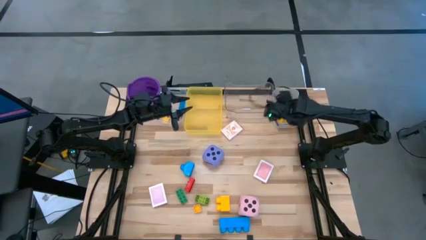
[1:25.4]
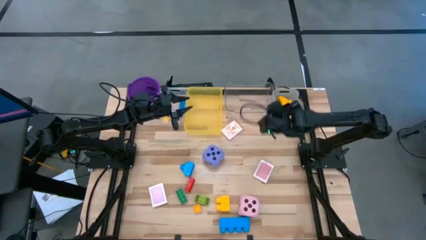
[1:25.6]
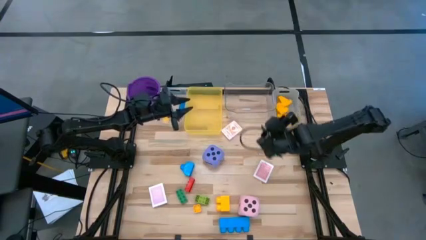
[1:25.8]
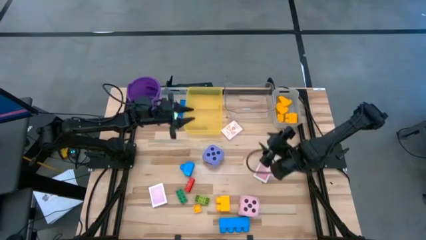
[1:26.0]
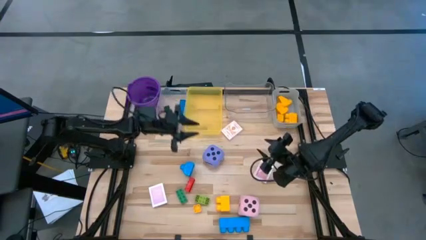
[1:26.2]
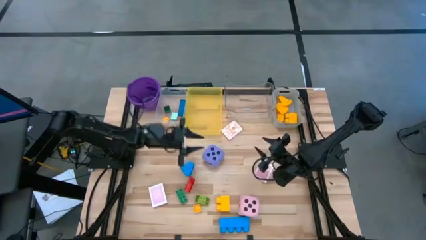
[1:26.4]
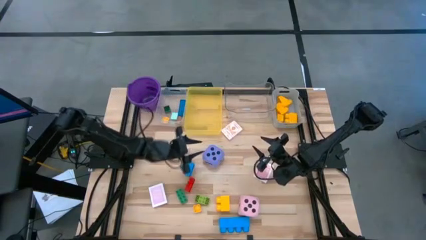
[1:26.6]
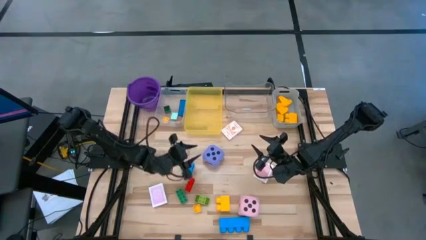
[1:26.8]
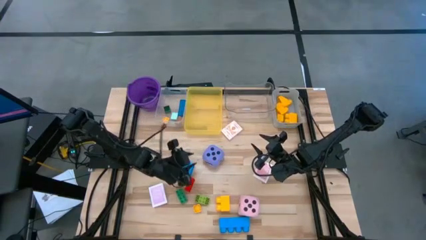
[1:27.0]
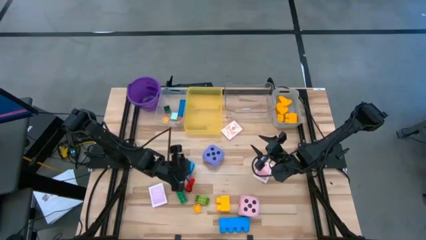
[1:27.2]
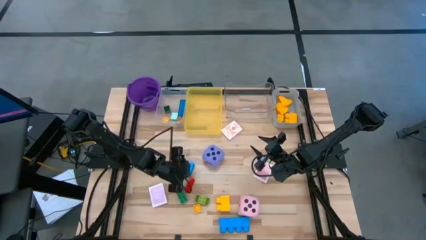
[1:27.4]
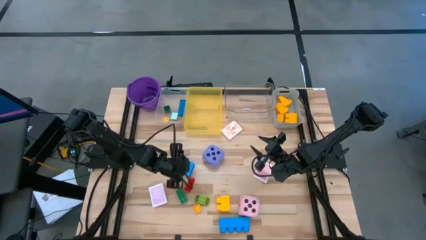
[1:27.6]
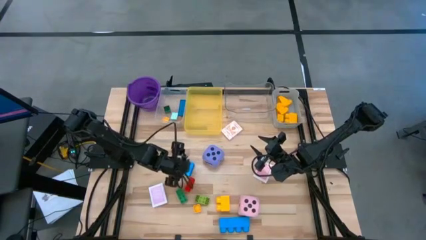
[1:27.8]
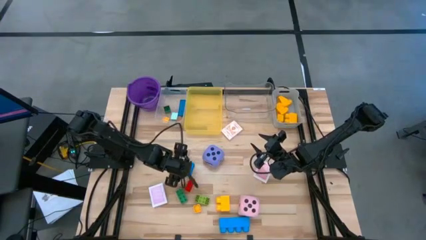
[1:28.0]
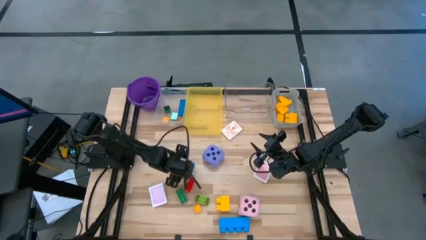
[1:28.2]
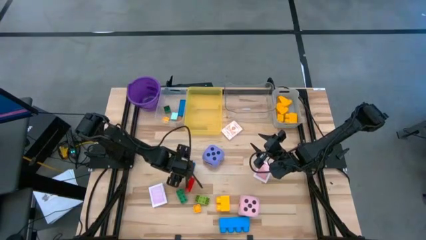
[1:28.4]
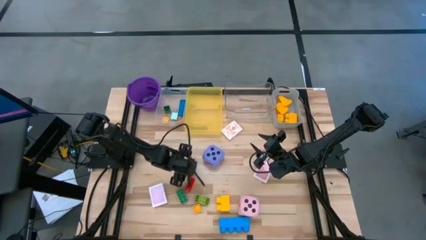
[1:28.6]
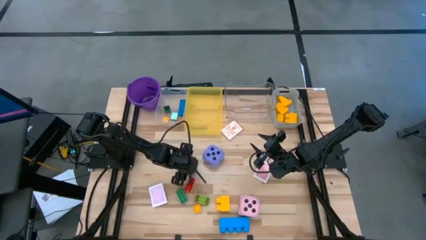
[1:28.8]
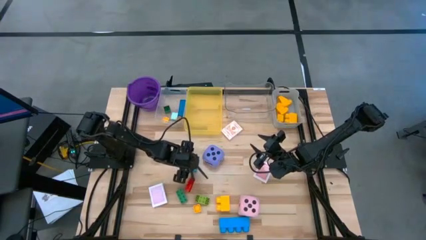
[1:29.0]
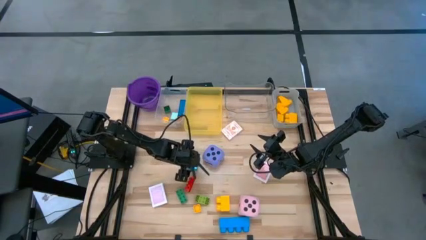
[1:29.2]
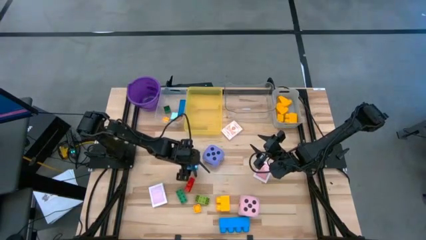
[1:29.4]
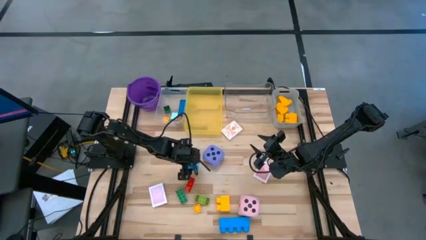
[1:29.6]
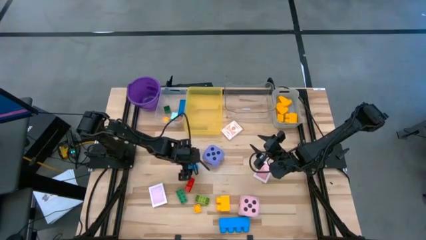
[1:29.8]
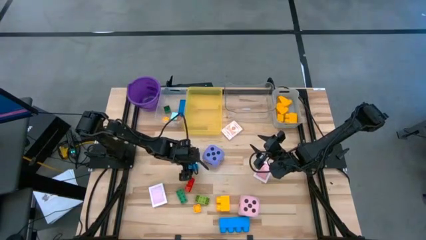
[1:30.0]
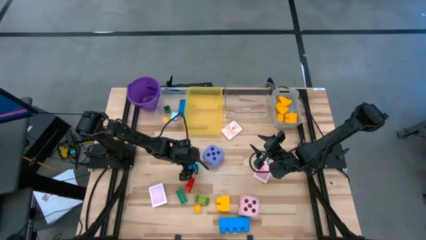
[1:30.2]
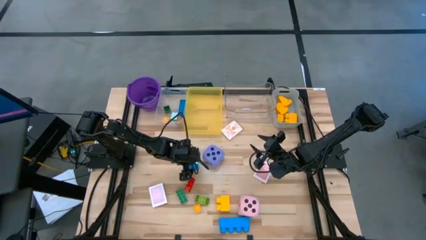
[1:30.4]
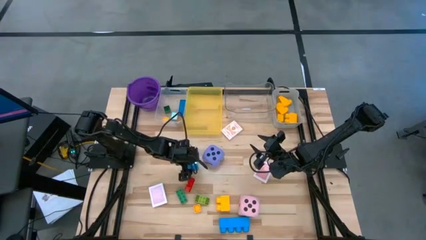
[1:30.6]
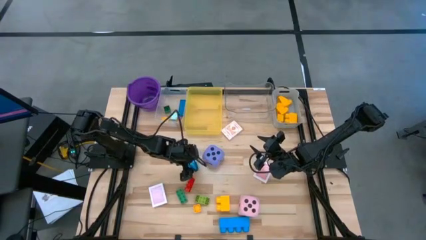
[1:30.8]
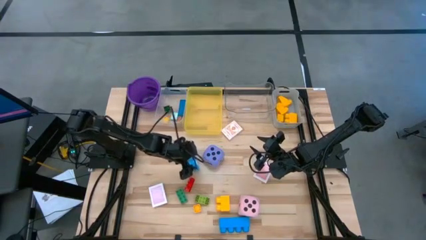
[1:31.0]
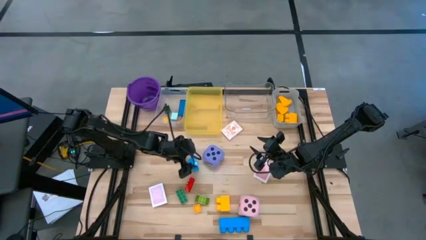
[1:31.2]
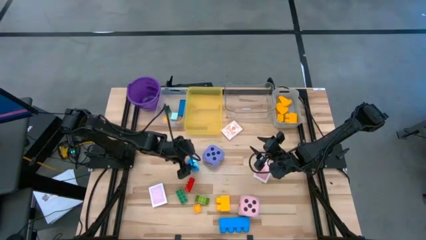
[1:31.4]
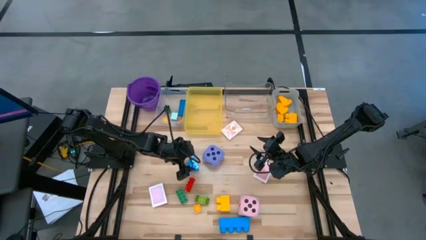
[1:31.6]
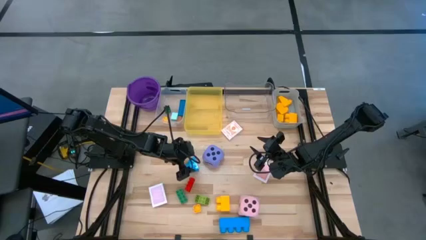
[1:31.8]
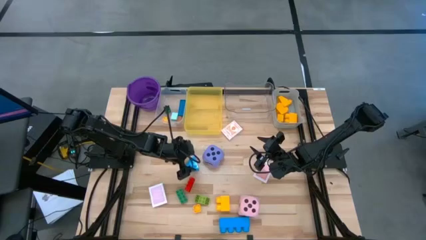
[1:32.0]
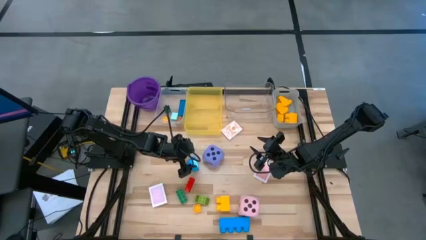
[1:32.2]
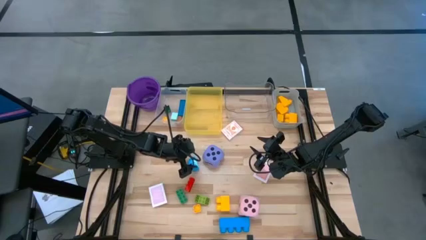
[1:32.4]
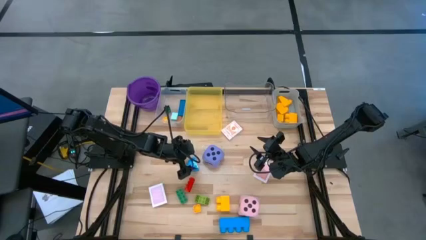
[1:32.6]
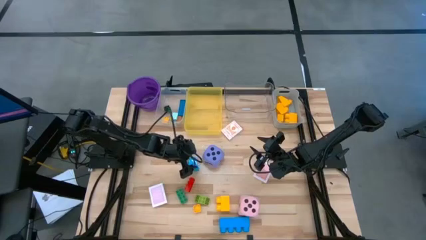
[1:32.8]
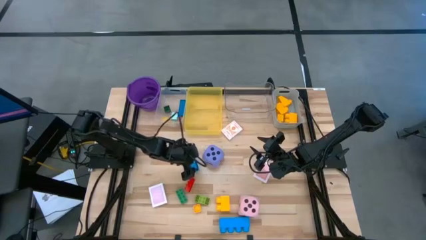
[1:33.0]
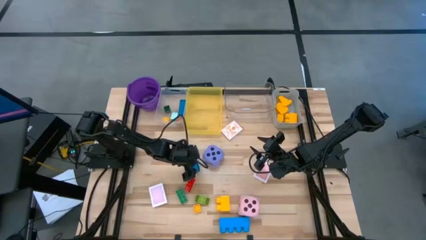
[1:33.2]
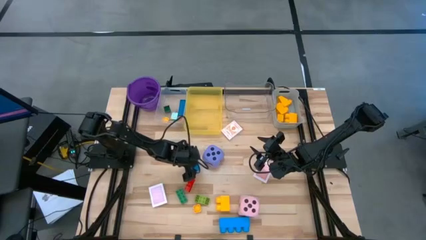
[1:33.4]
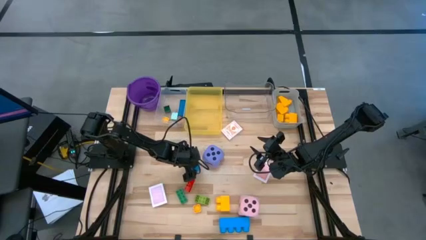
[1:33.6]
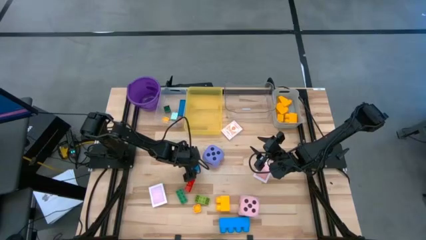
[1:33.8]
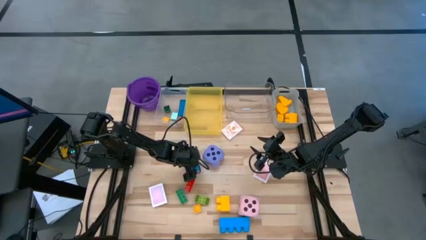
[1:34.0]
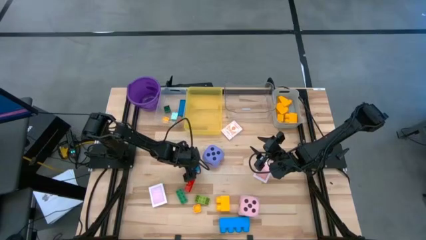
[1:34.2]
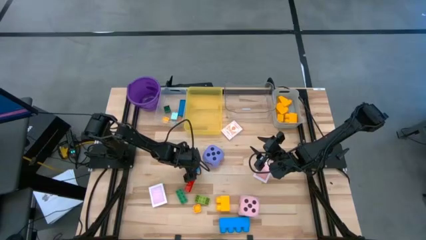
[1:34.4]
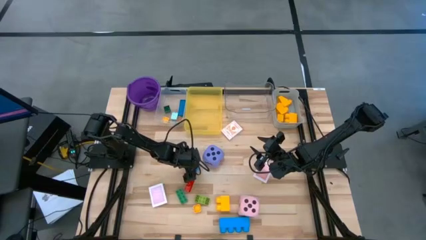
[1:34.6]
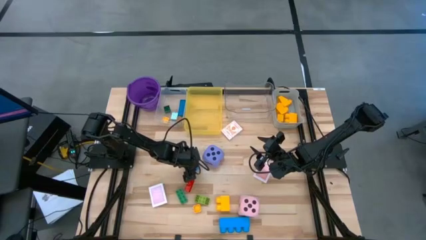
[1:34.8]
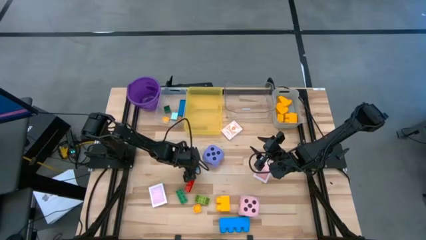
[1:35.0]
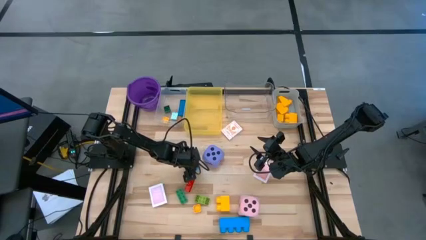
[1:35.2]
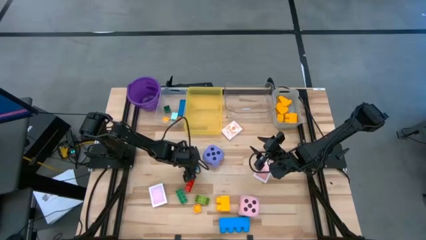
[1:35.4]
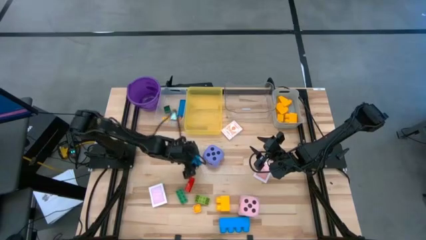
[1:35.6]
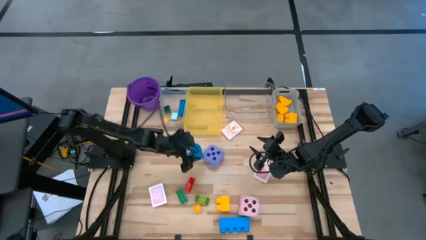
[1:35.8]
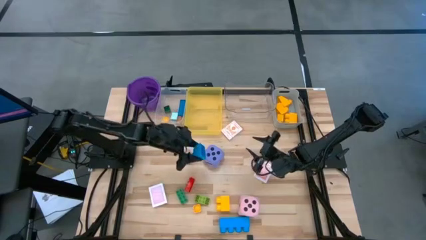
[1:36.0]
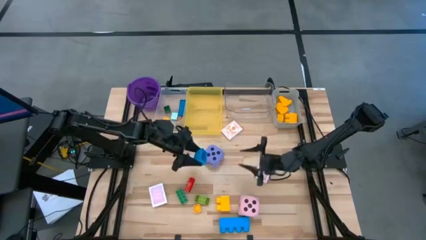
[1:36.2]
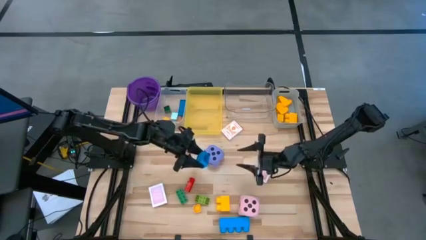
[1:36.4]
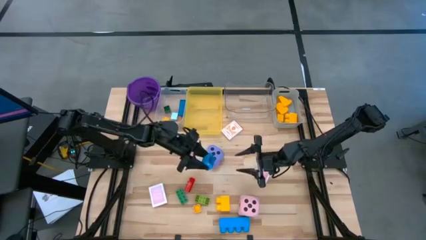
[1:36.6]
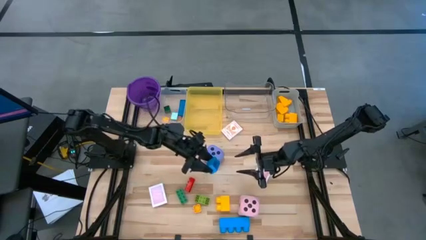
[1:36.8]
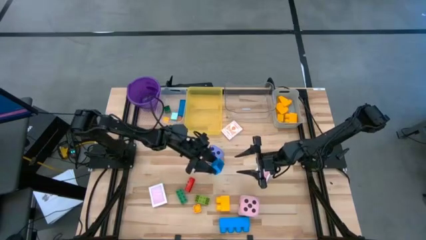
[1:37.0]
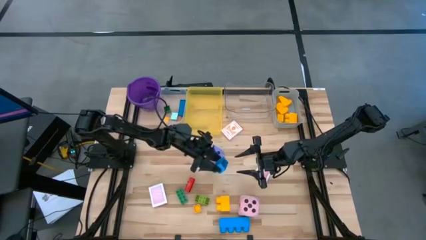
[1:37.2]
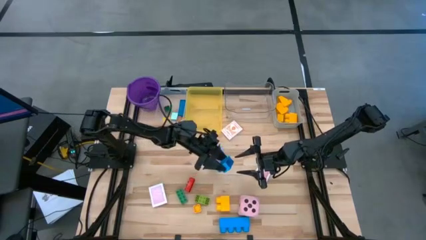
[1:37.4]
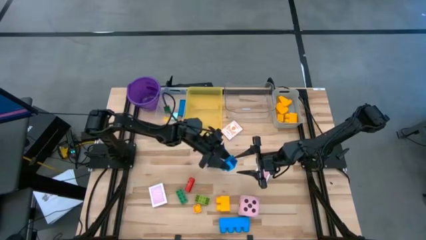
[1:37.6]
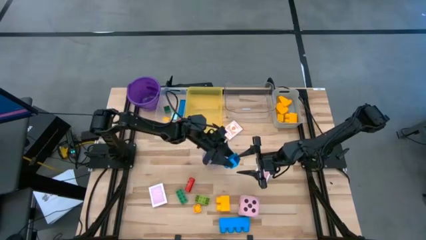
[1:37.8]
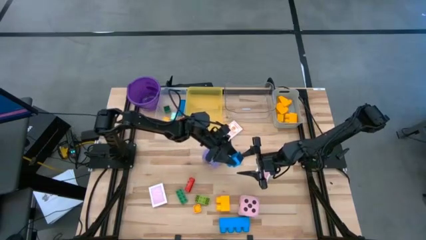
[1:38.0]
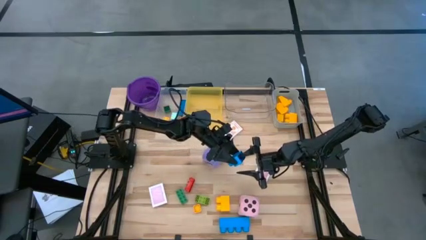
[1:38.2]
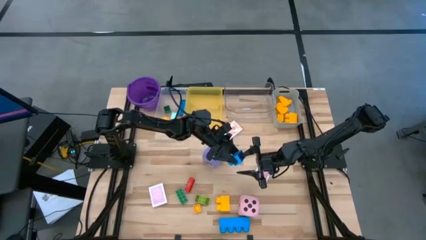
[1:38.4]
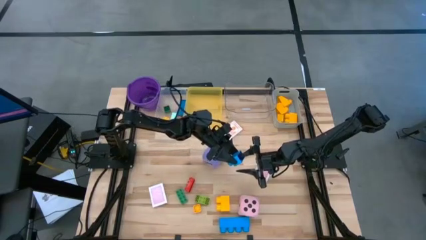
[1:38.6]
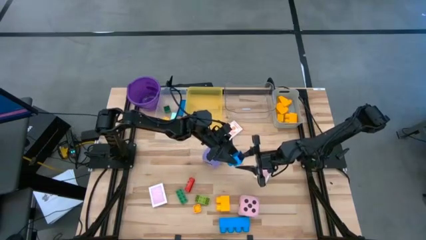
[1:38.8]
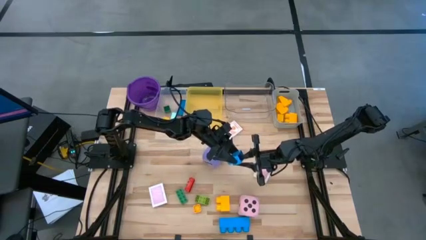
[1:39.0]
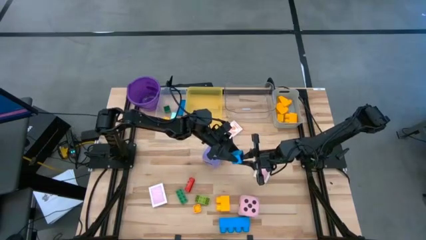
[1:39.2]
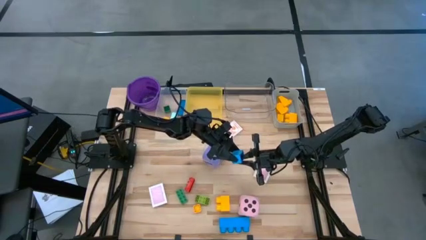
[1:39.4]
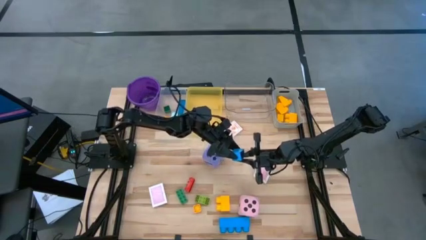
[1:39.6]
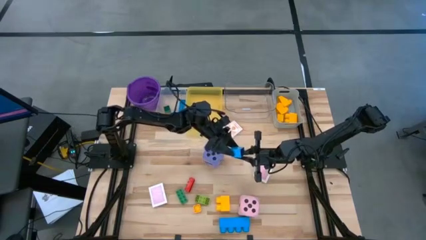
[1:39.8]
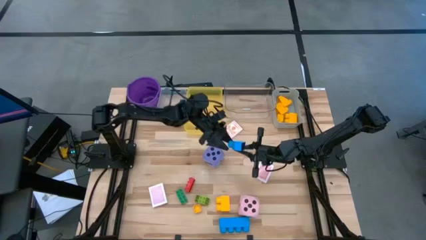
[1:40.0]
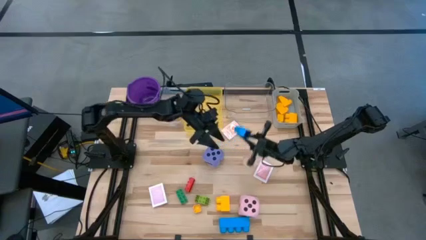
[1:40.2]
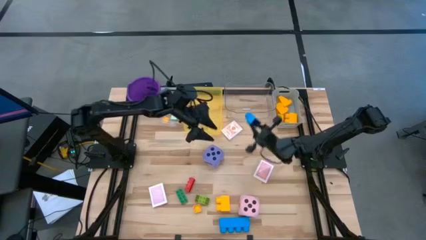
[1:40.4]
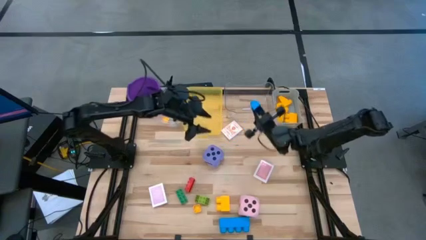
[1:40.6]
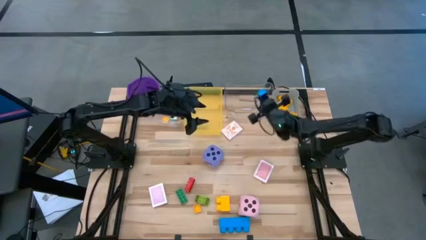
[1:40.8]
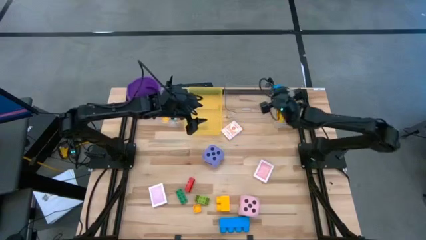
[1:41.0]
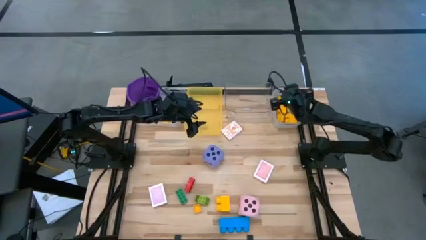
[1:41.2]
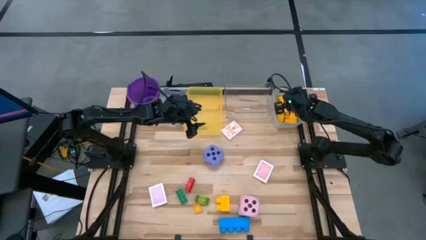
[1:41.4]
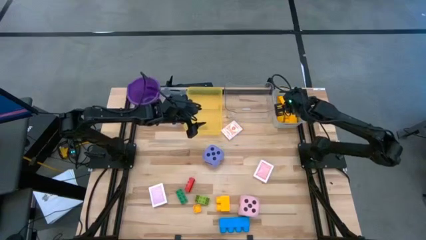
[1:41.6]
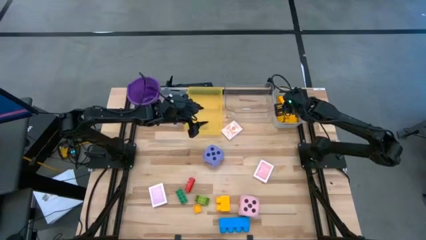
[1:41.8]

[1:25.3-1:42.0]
Task: Pick & Place Toys
Put the large blue game piece into the gray bin
